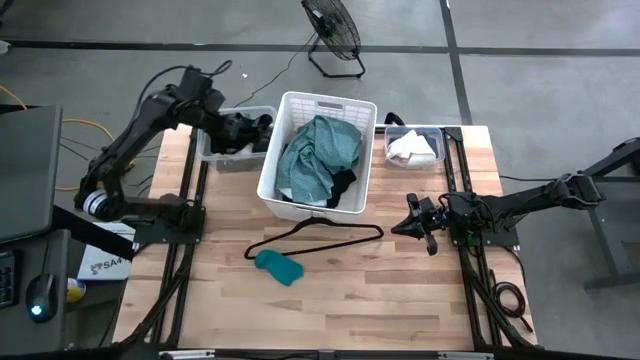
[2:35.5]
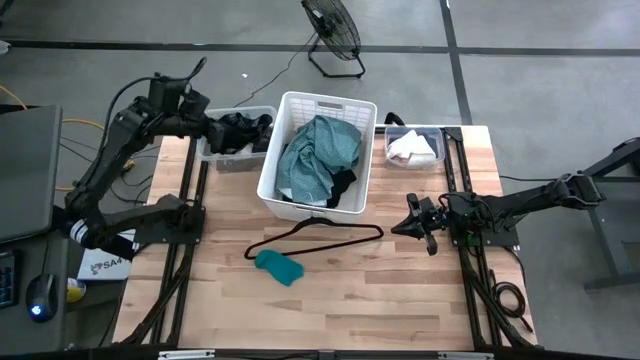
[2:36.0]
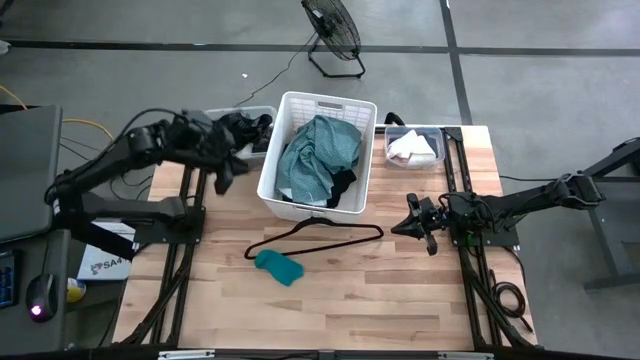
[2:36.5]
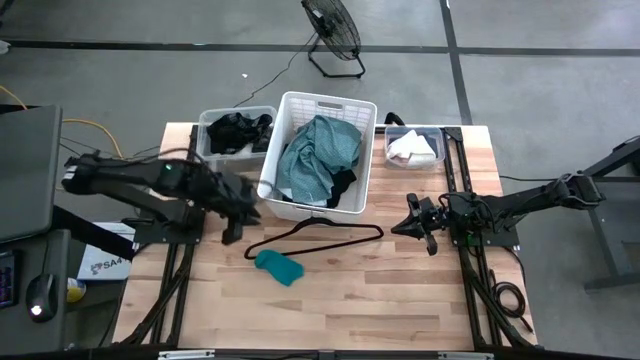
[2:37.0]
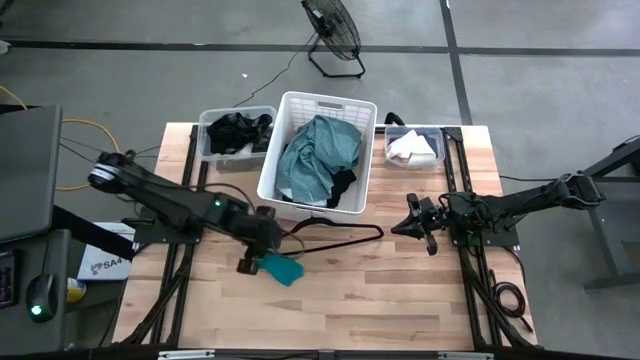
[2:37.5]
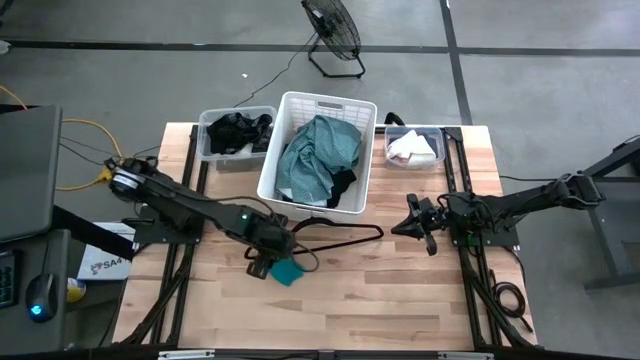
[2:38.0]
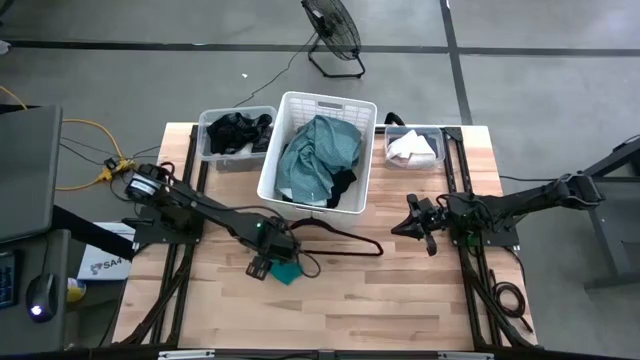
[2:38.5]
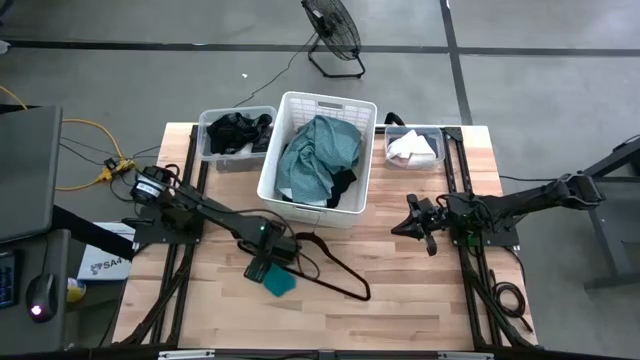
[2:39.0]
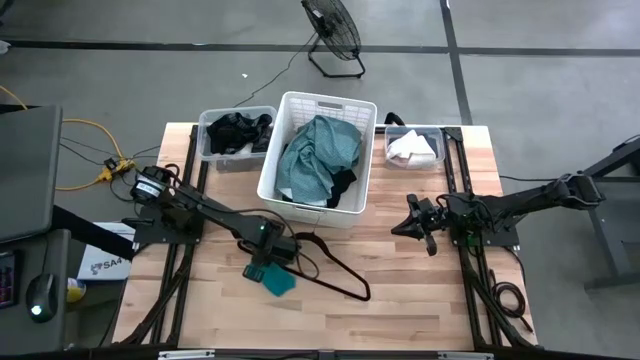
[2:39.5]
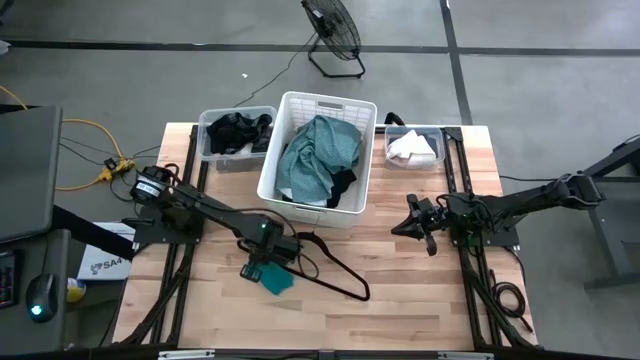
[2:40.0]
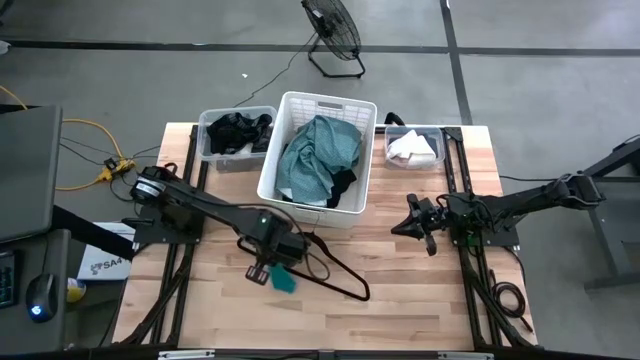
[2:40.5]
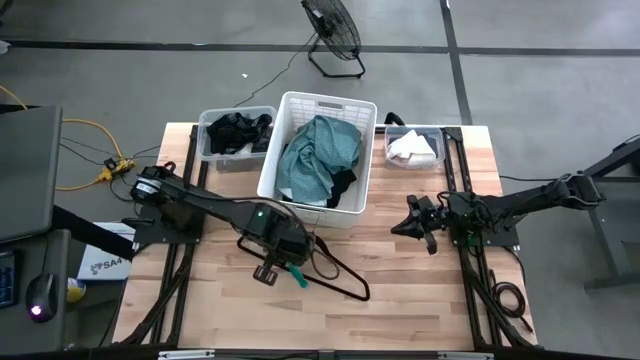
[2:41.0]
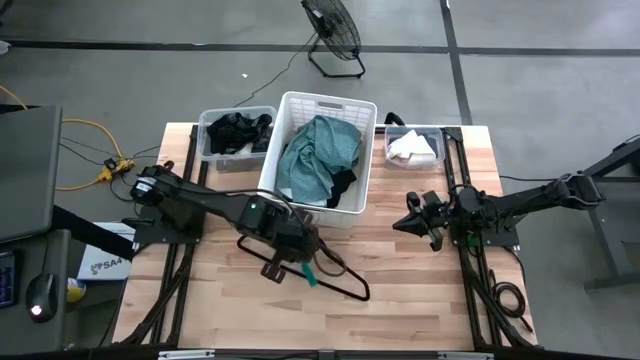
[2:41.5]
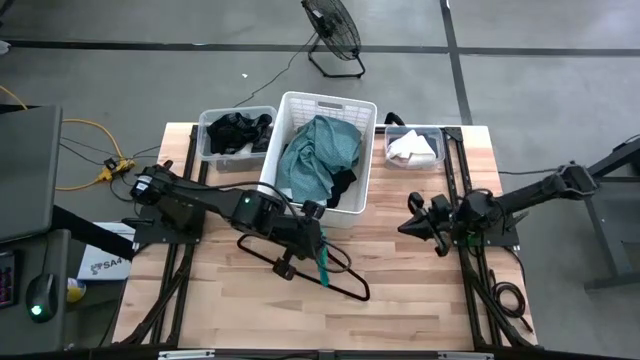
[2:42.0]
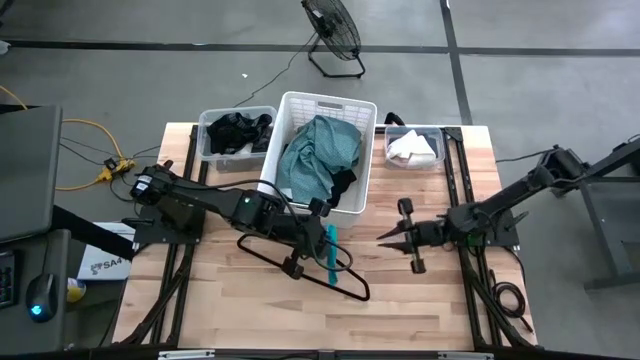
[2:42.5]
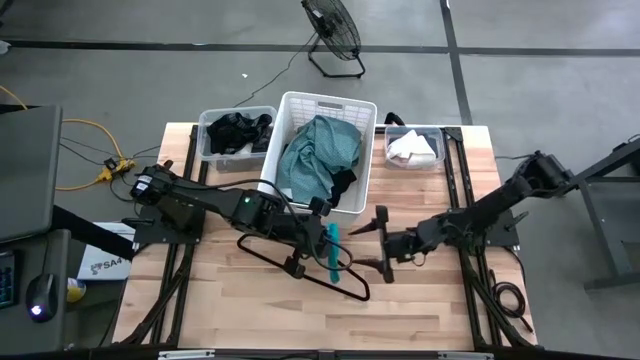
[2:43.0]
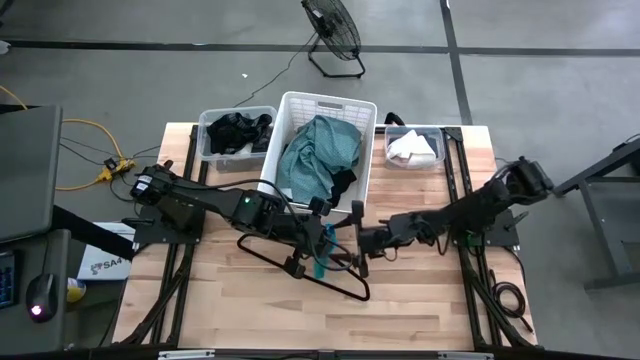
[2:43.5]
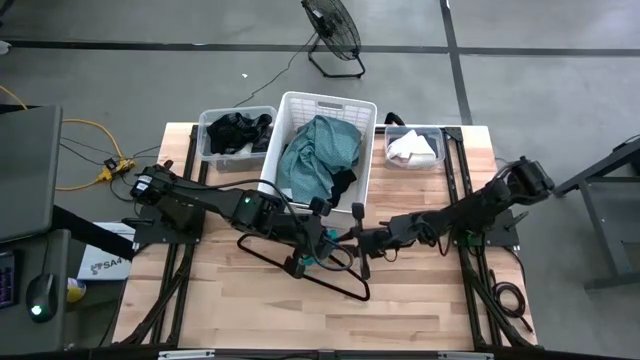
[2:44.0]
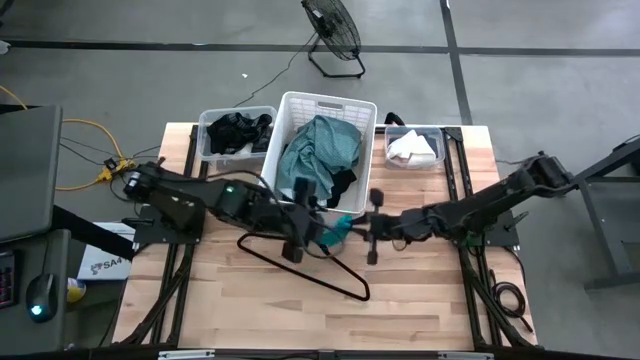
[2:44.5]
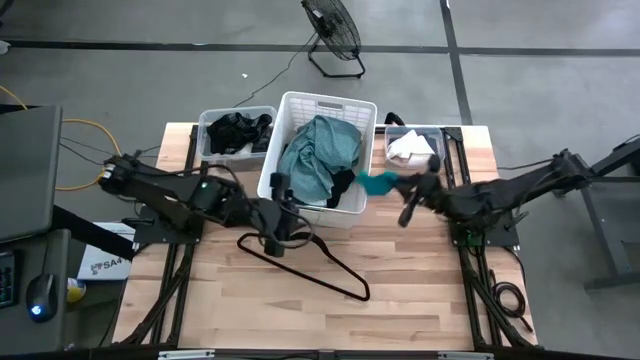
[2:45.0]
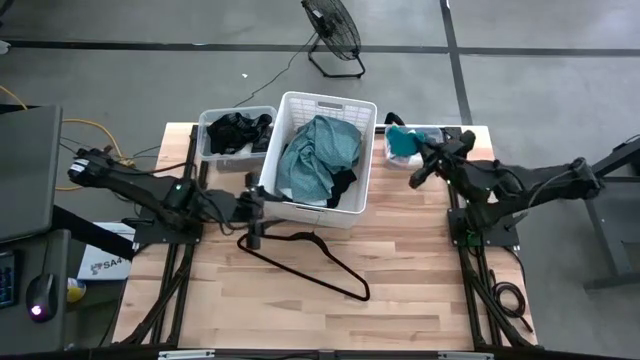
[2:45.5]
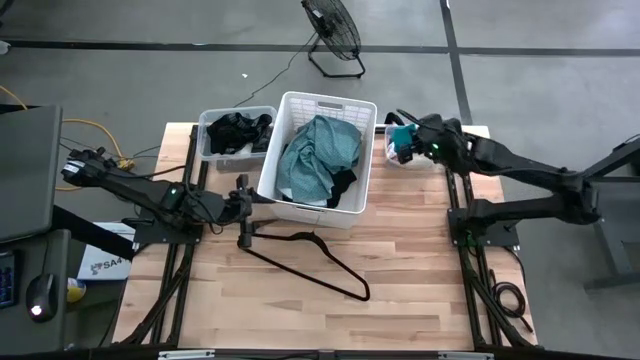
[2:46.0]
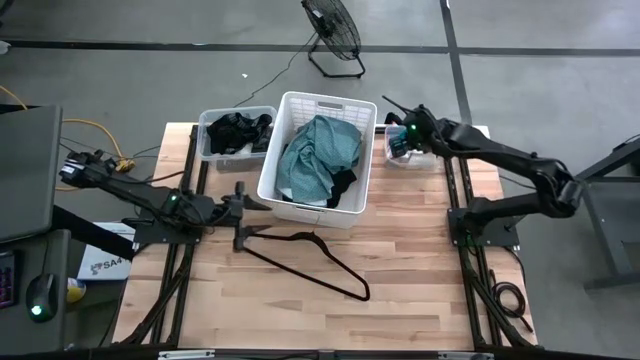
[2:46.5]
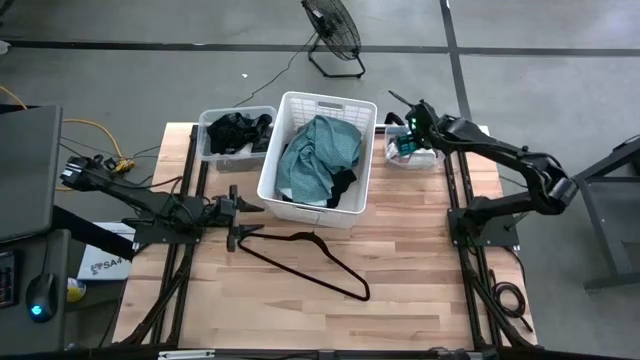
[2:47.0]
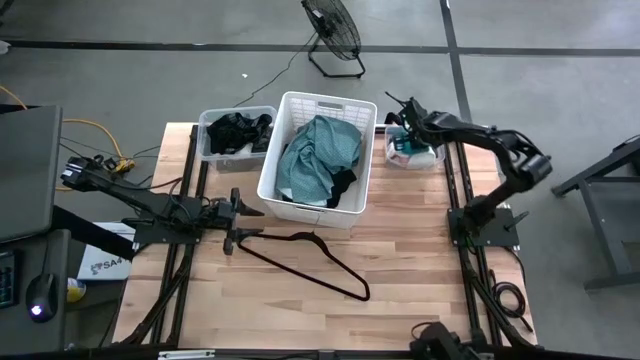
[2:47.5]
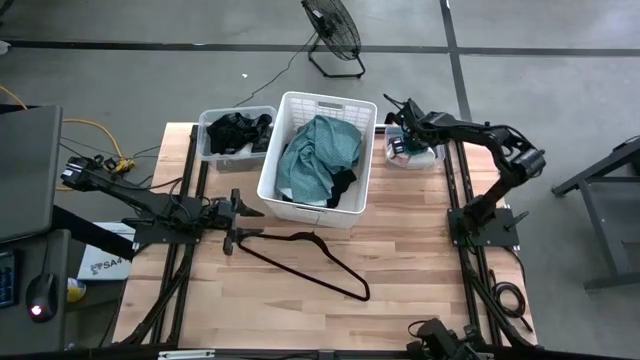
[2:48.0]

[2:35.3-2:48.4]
Task: Pick & Place Cloths
Put the blue sock into the right transparent bin

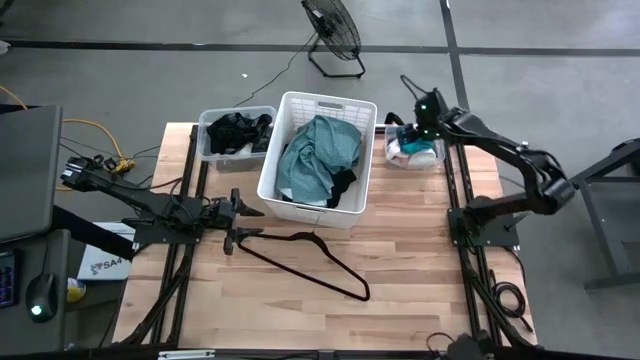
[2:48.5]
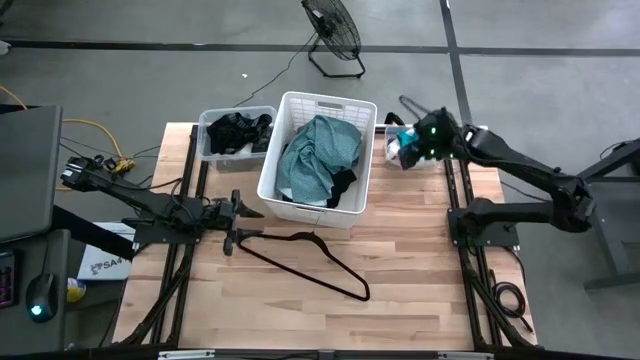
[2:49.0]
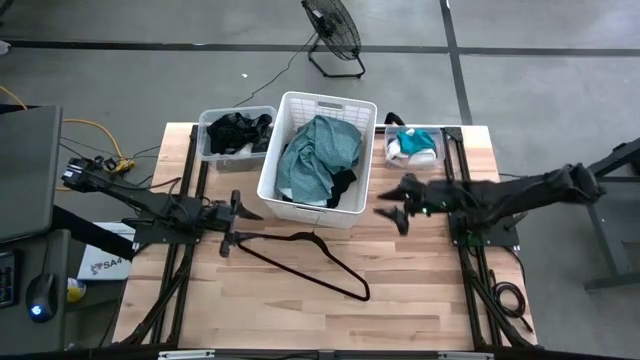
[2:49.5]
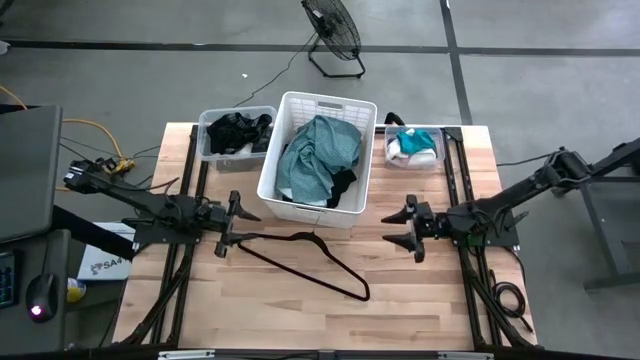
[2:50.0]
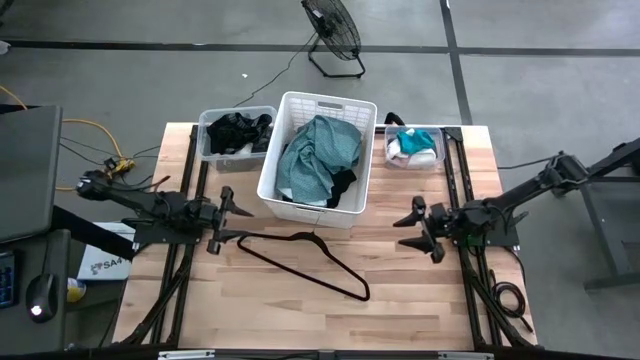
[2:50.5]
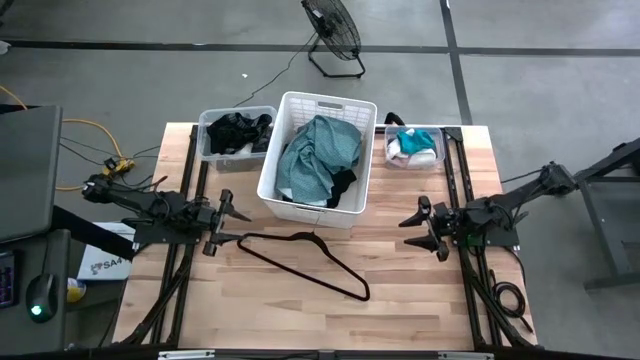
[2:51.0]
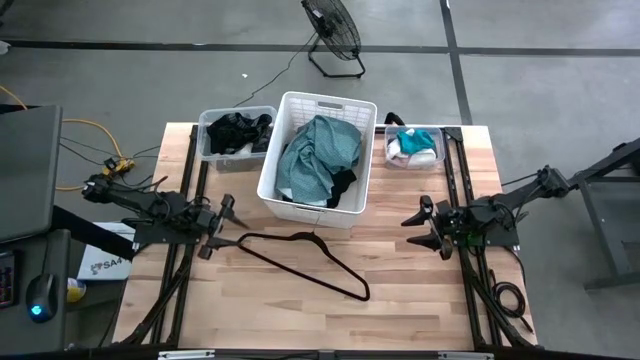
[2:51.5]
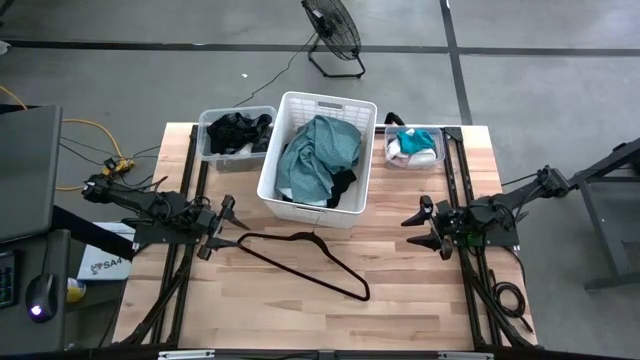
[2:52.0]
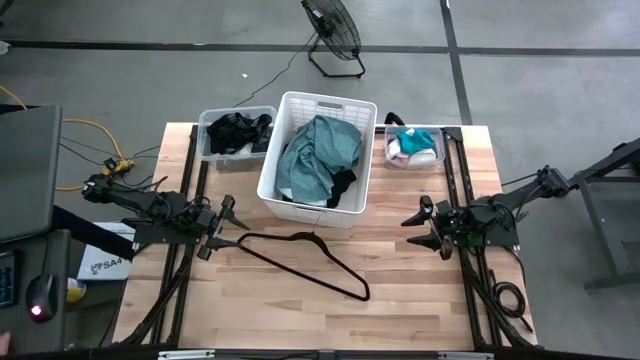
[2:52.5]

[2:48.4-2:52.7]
Return to Home Position

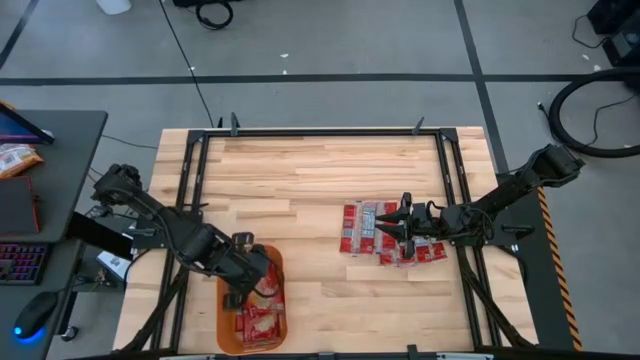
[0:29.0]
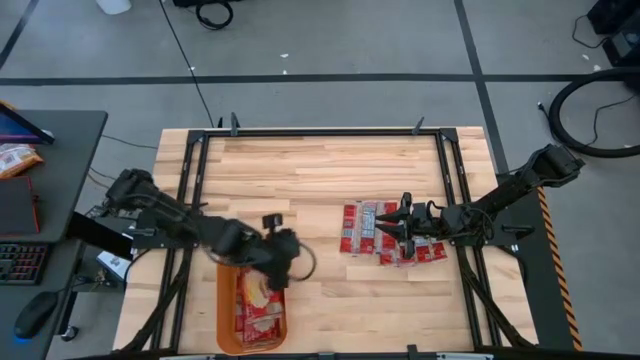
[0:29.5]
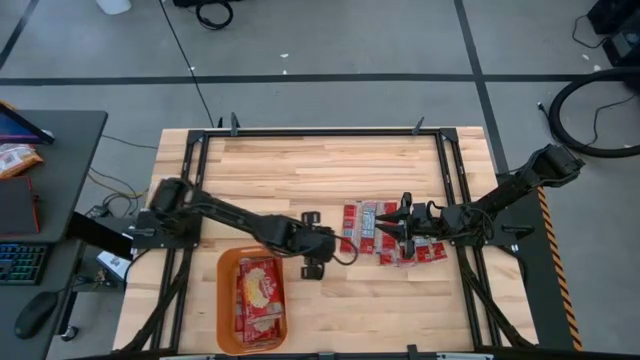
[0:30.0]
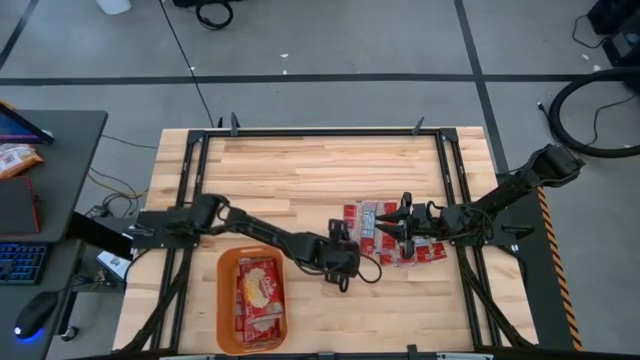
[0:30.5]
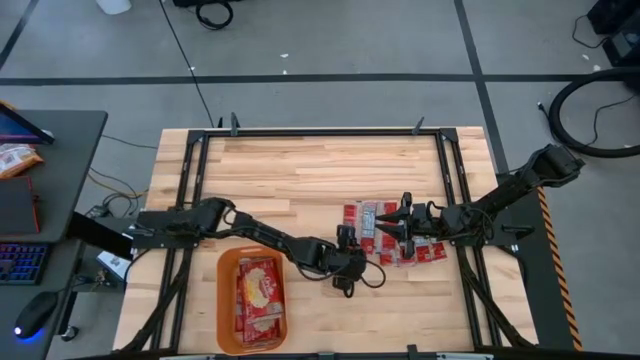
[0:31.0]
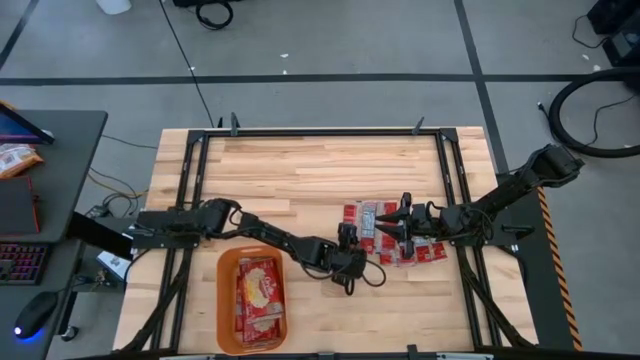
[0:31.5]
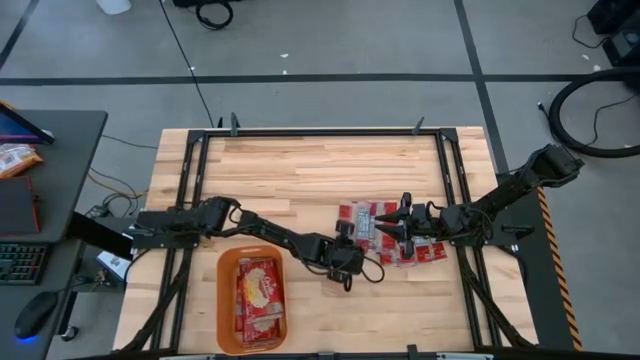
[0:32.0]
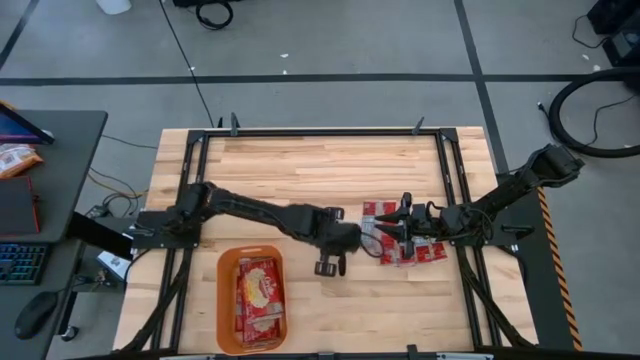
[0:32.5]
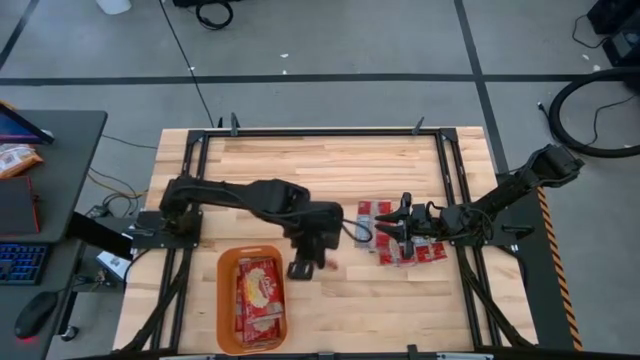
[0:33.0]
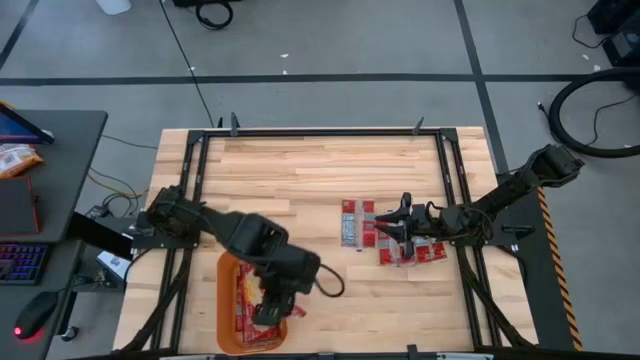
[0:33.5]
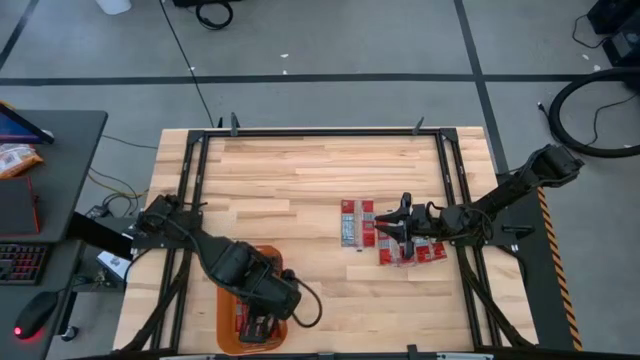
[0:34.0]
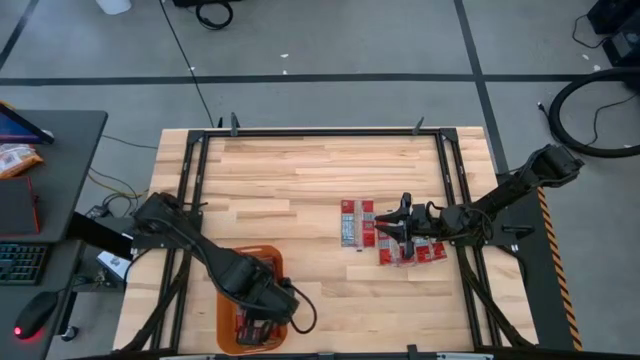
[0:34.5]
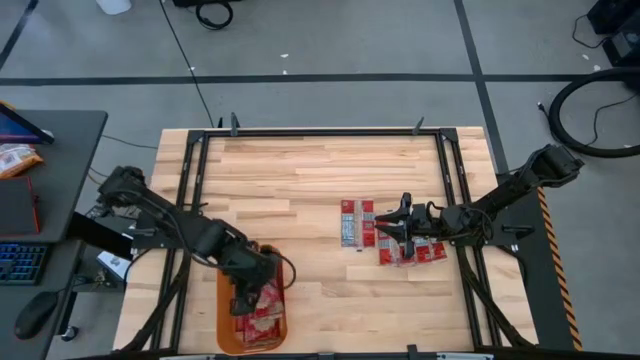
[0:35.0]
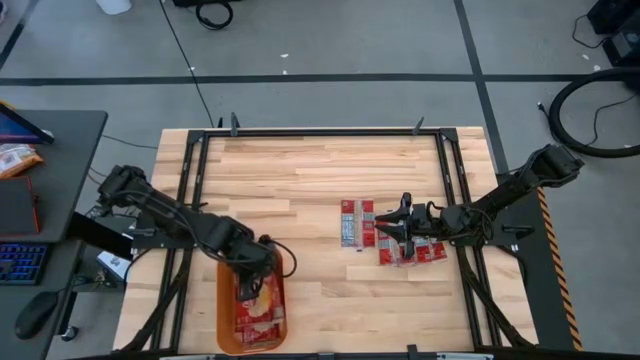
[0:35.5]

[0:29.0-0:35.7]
Task: Sort popcorn bags into baskets
Put the red popcorn pack into the orange bin
